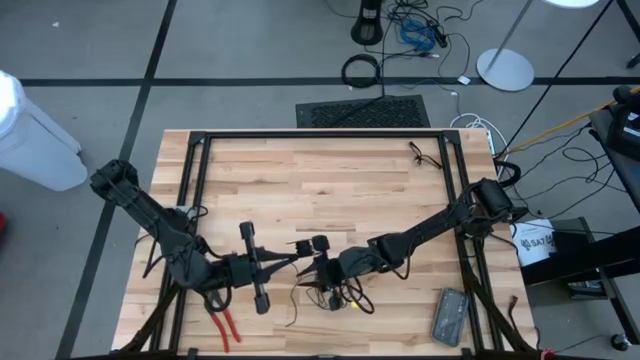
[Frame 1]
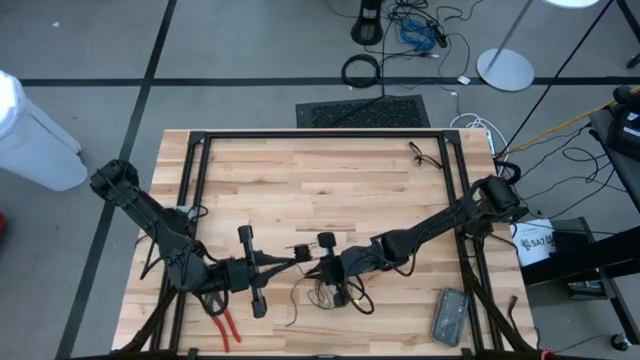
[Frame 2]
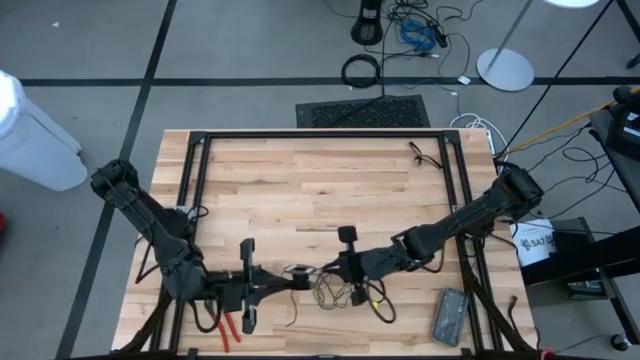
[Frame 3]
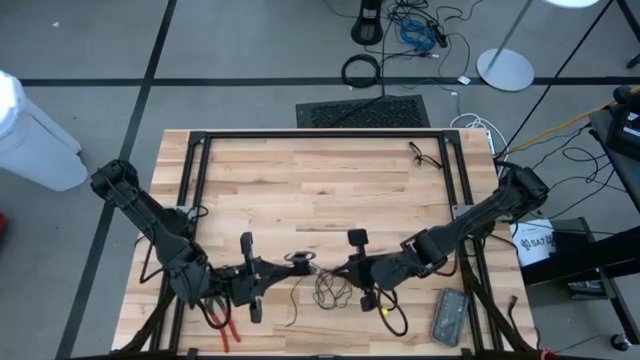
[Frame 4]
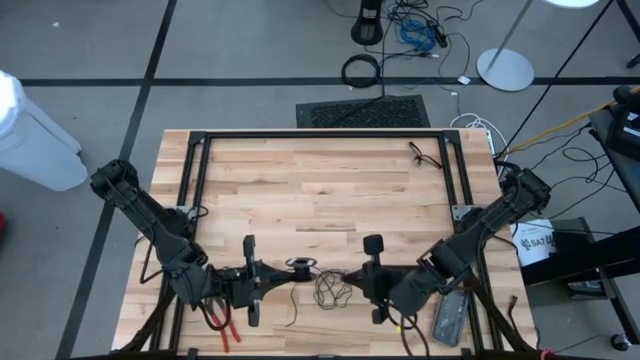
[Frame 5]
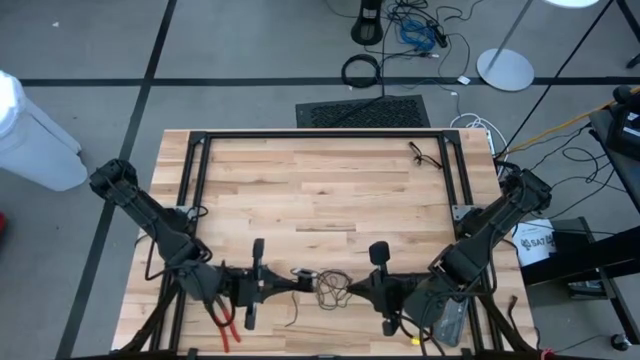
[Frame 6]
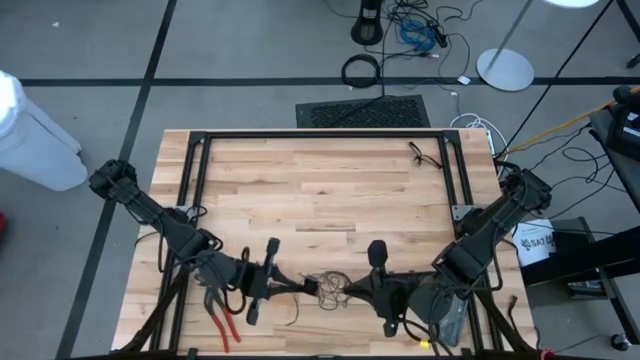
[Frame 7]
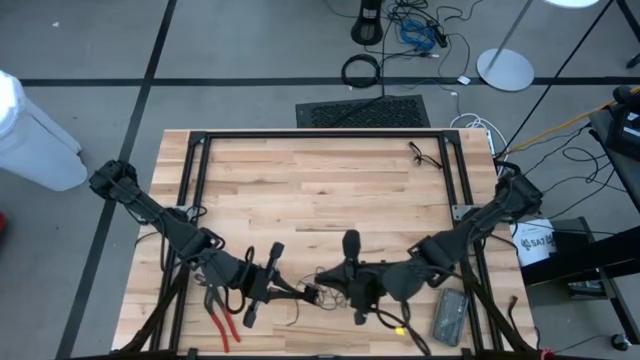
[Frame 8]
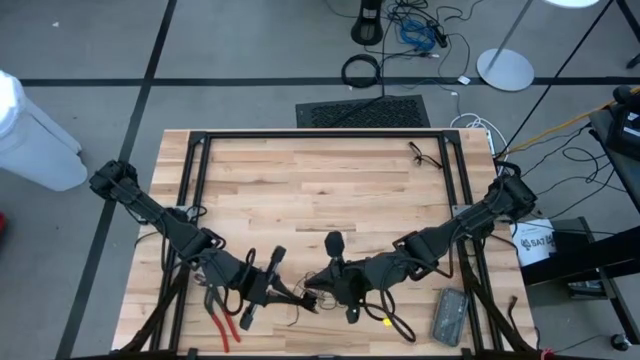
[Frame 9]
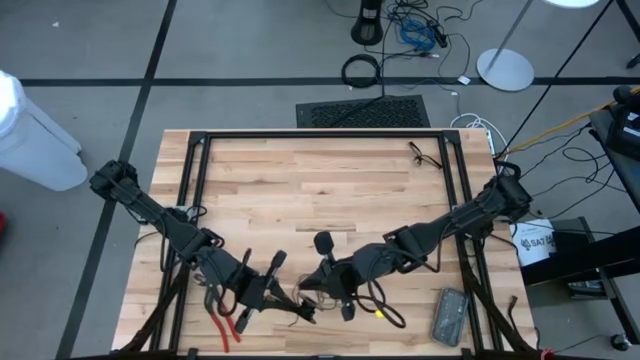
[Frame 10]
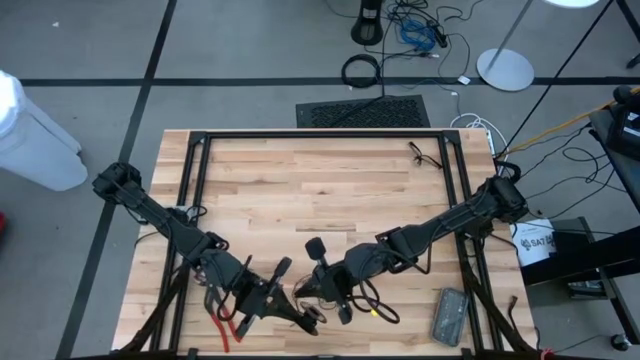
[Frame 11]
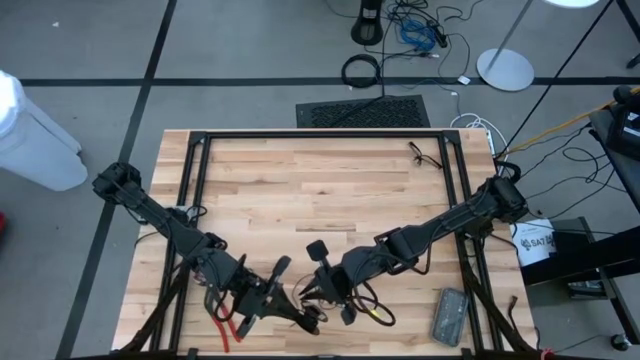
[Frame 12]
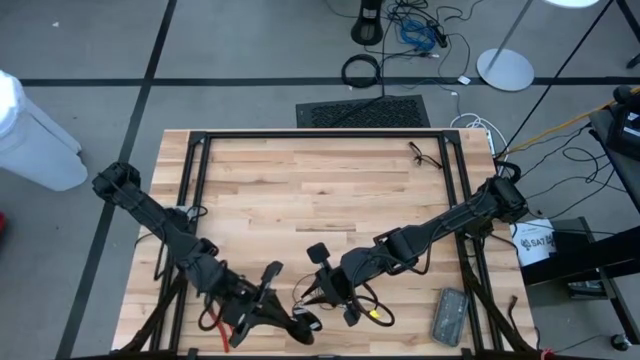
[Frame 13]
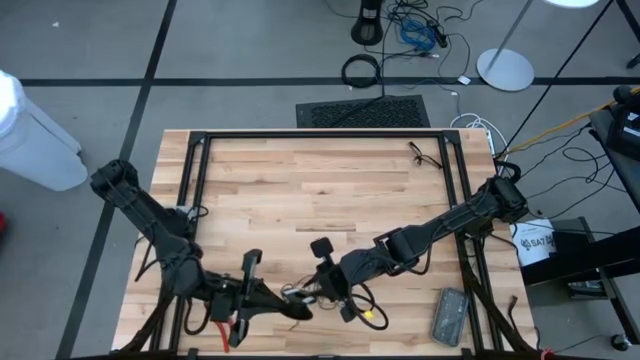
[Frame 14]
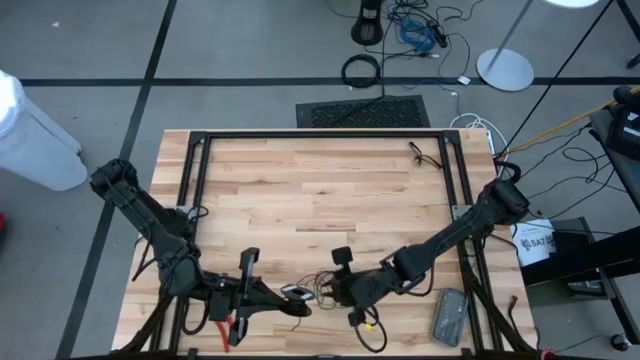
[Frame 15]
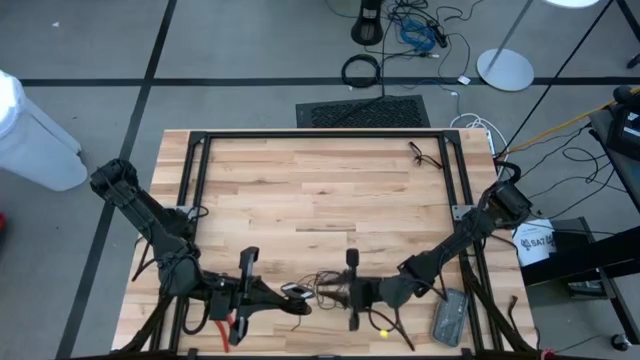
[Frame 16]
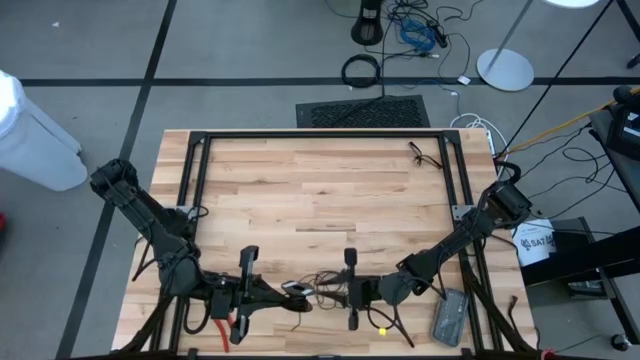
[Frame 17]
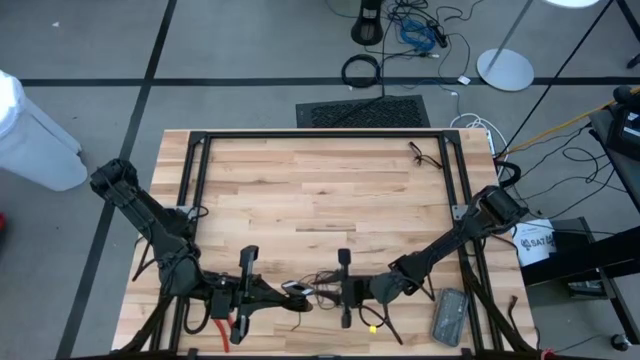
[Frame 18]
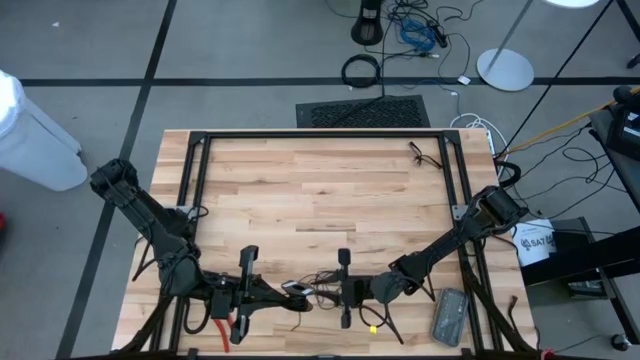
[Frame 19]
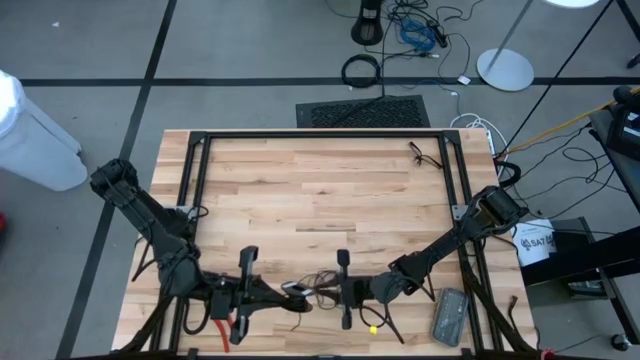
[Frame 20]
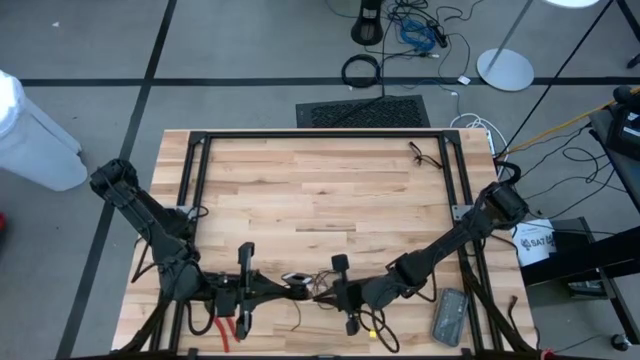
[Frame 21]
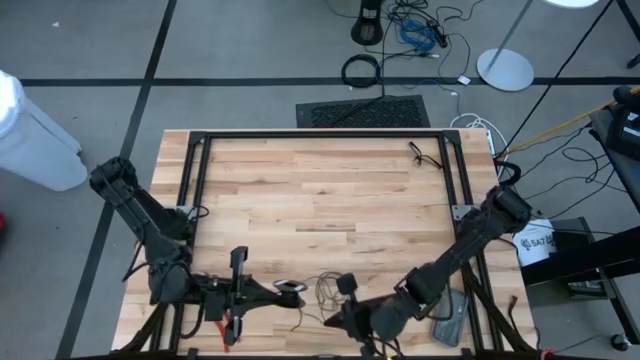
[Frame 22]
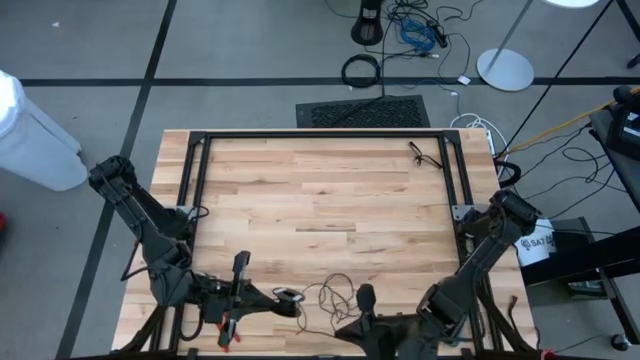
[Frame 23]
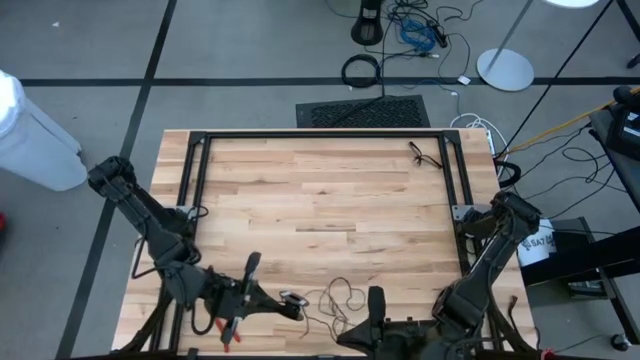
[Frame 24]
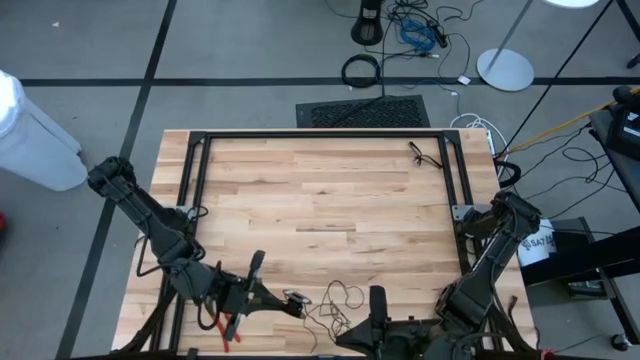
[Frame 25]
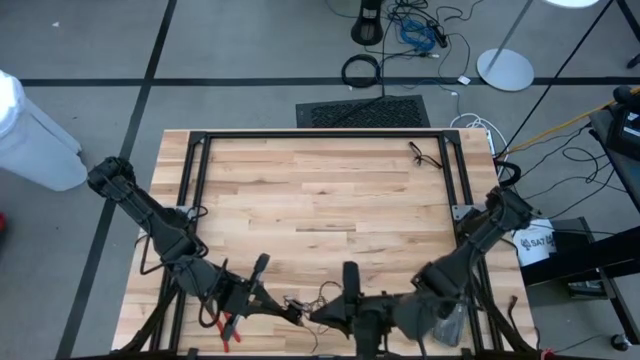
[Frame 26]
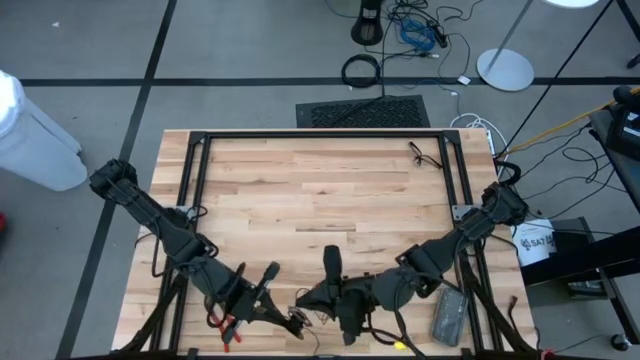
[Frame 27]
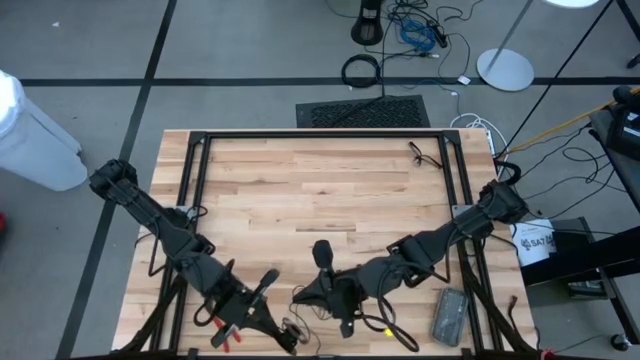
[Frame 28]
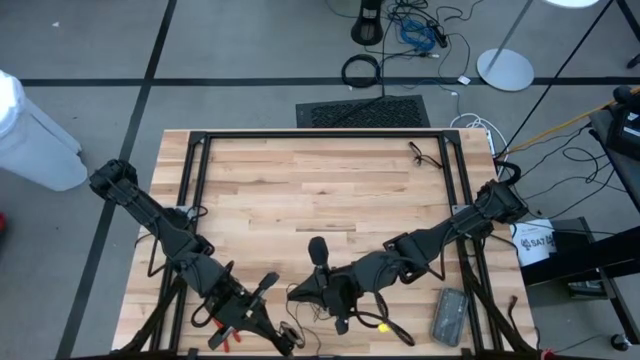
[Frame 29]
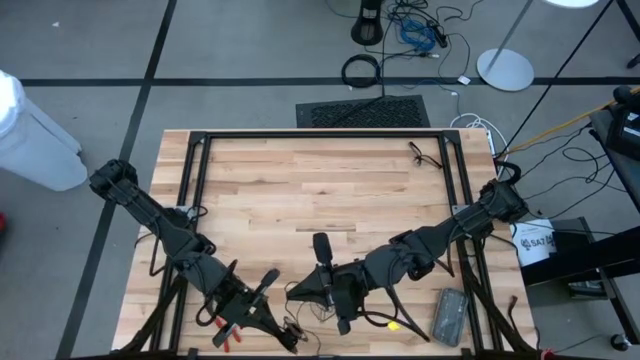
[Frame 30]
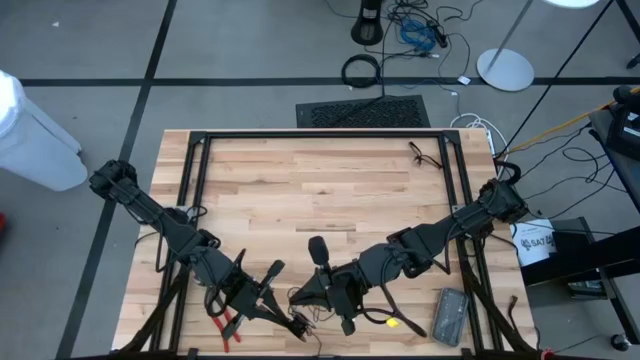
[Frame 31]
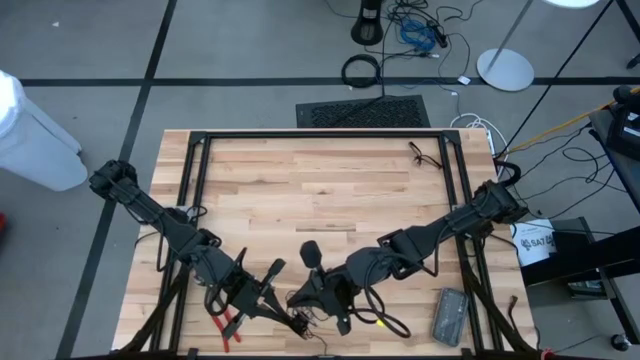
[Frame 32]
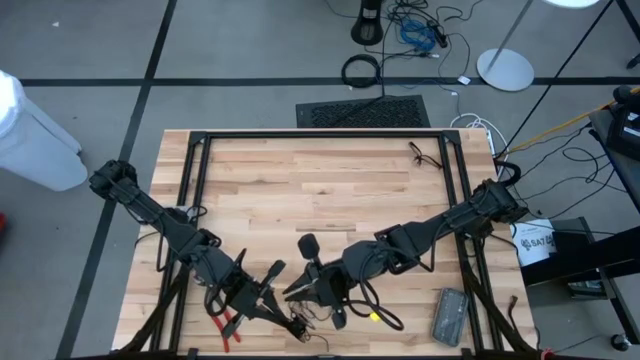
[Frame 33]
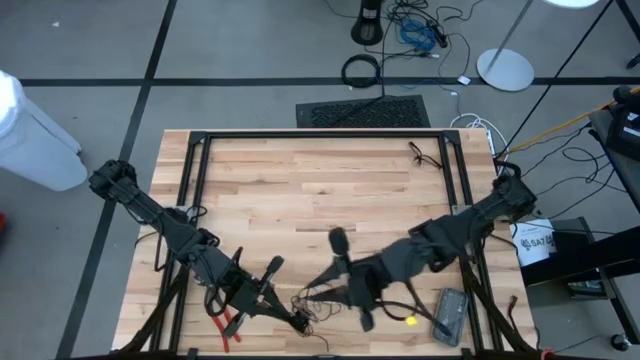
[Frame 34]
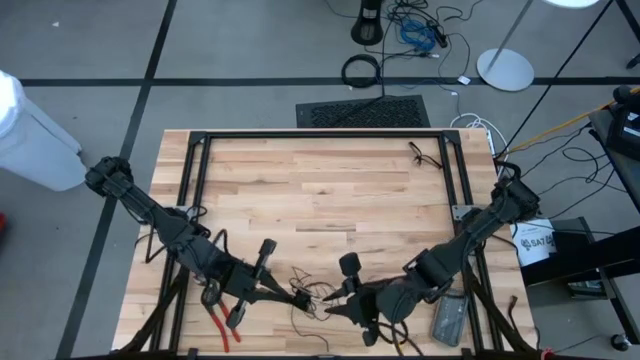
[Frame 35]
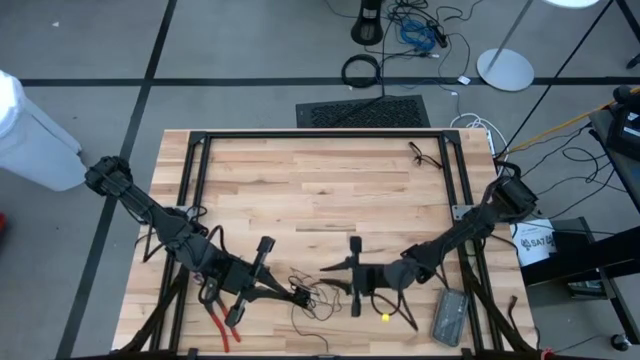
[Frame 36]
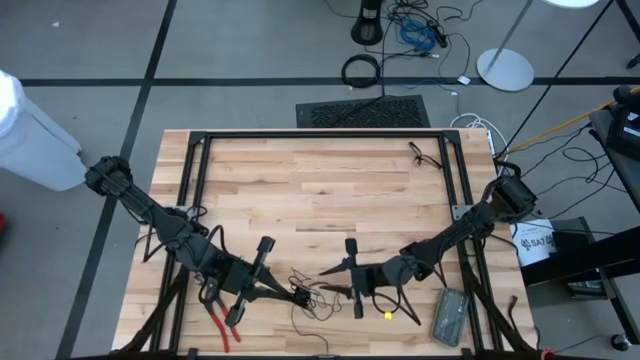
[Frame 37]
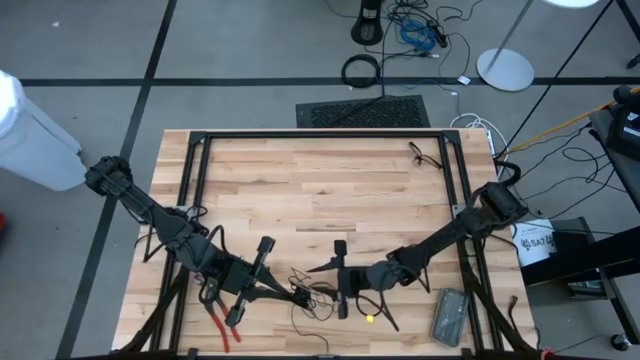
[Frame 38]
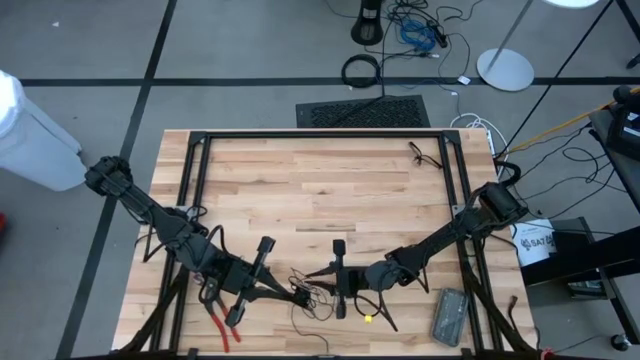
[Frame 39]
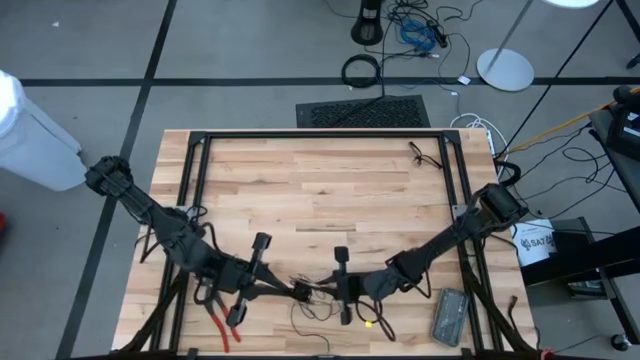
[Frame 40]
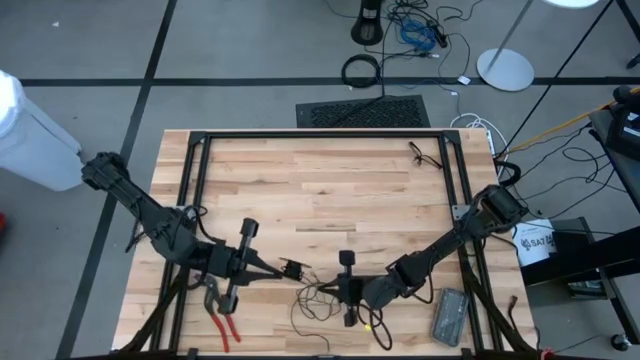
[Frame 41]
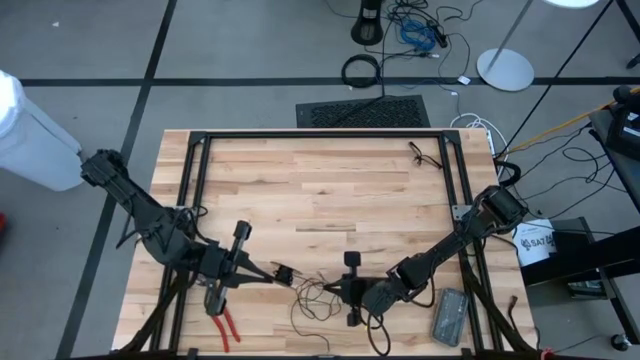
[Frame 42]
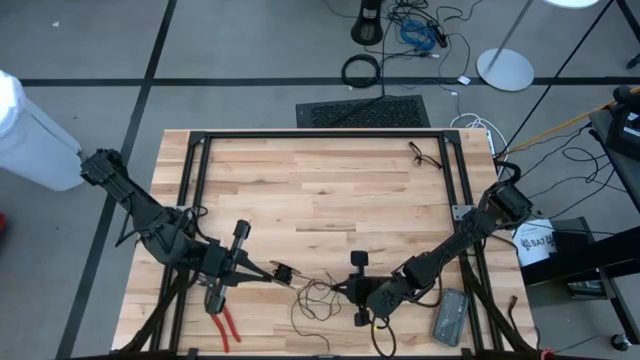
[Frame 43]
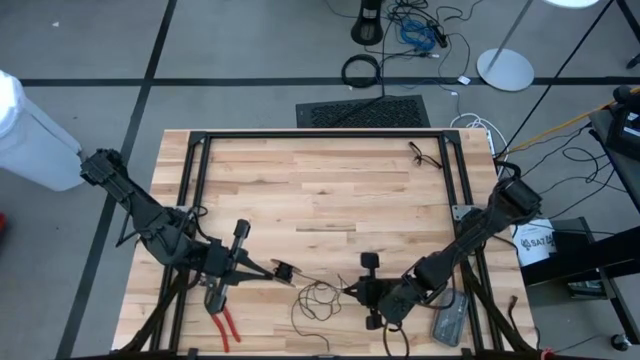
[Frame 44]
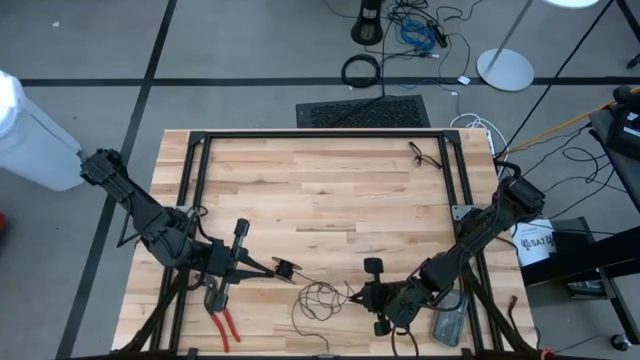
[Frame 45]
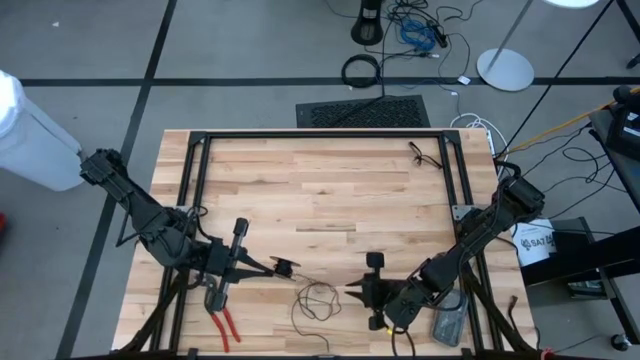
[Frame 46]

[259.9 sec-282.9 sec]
Task: Coil cords
Coil the black wire onto the black spool
